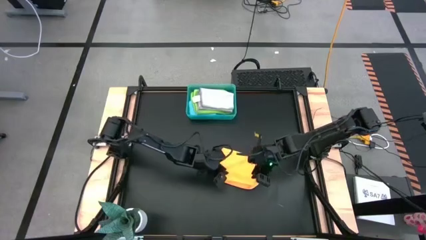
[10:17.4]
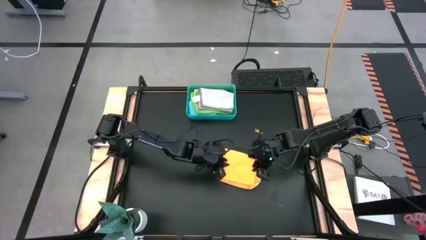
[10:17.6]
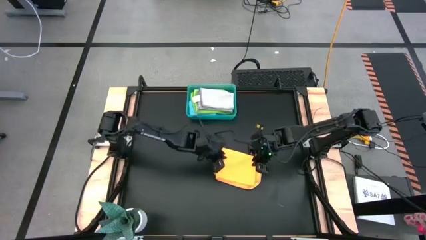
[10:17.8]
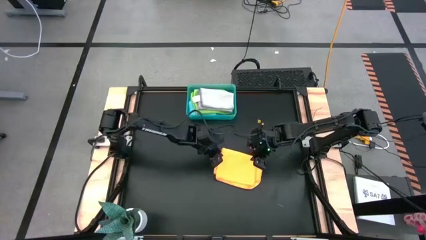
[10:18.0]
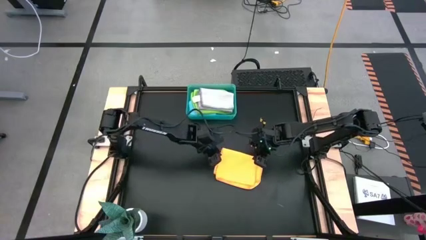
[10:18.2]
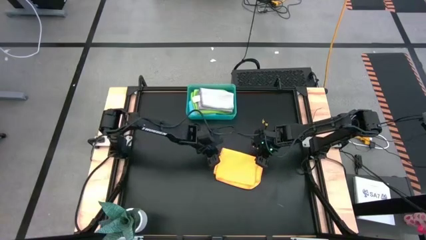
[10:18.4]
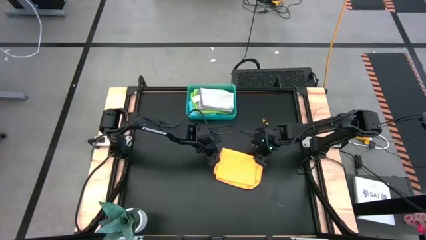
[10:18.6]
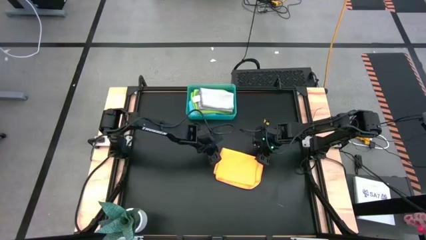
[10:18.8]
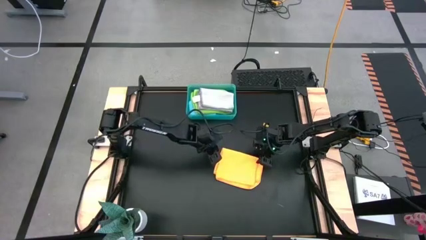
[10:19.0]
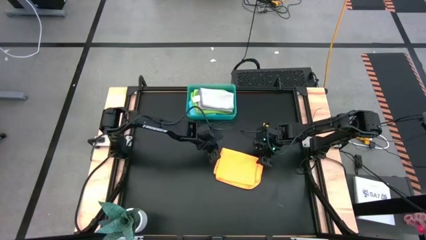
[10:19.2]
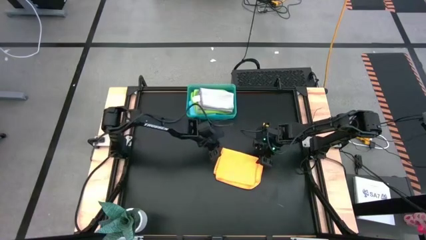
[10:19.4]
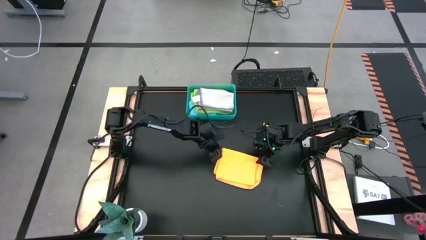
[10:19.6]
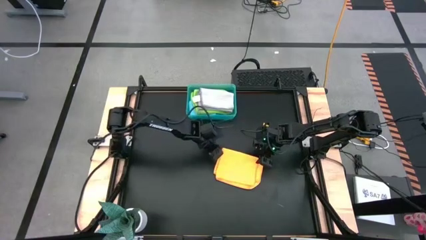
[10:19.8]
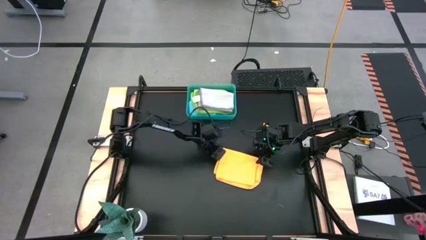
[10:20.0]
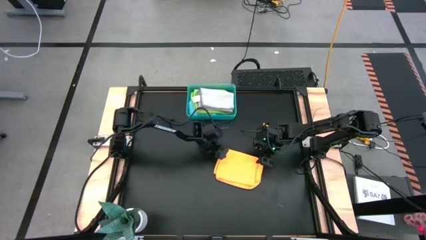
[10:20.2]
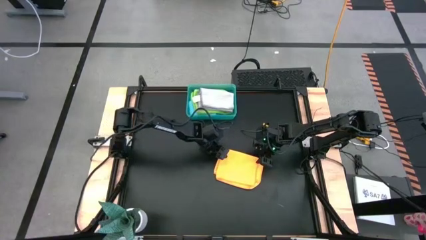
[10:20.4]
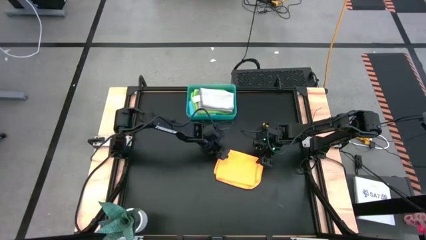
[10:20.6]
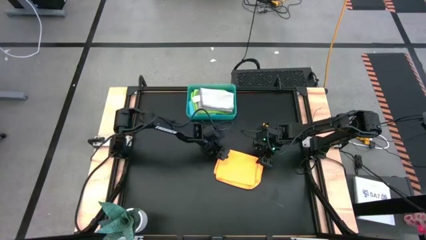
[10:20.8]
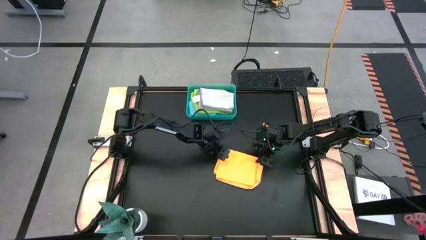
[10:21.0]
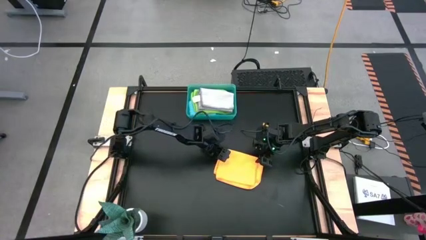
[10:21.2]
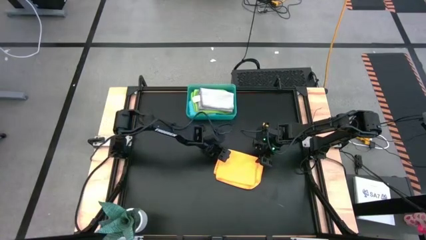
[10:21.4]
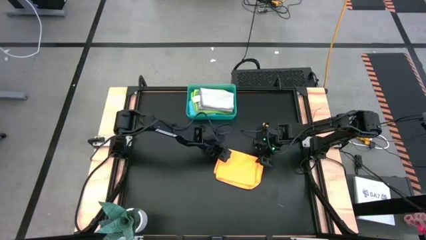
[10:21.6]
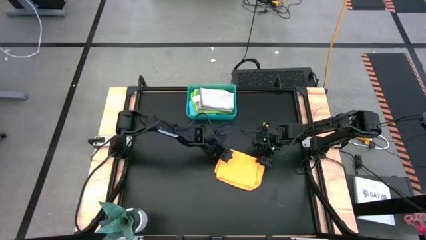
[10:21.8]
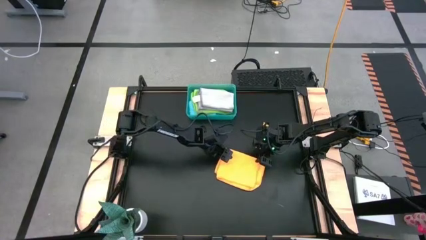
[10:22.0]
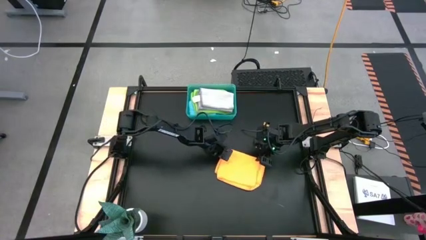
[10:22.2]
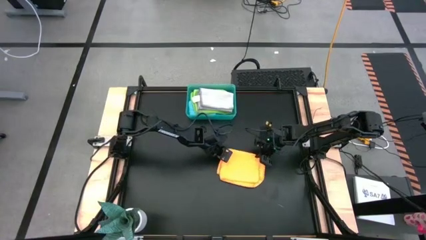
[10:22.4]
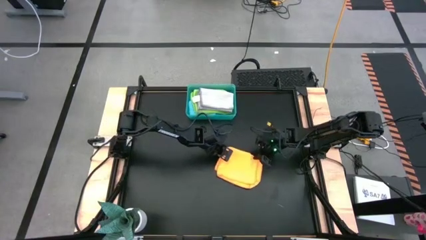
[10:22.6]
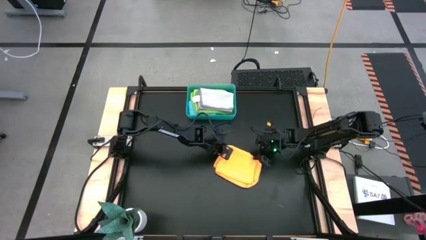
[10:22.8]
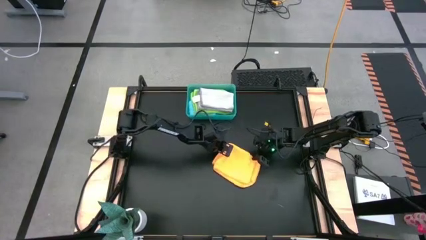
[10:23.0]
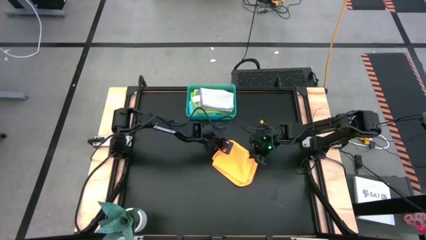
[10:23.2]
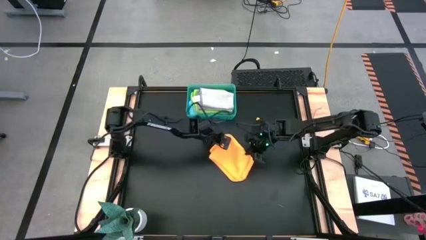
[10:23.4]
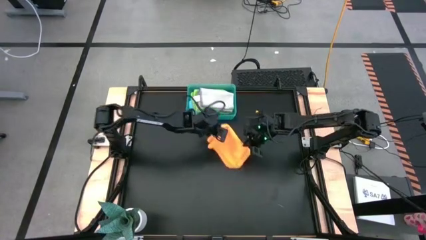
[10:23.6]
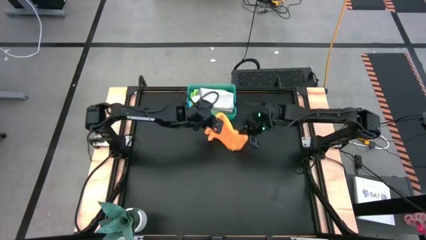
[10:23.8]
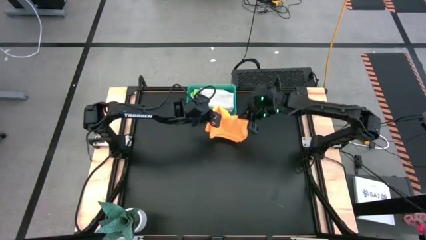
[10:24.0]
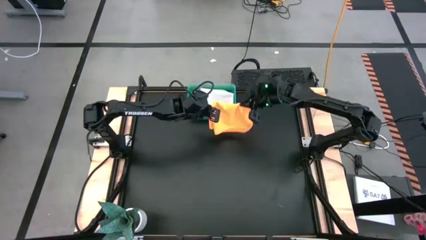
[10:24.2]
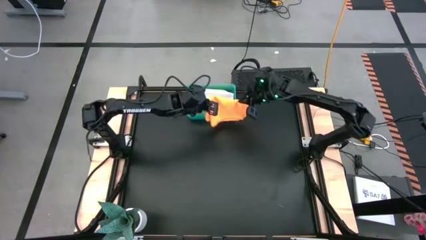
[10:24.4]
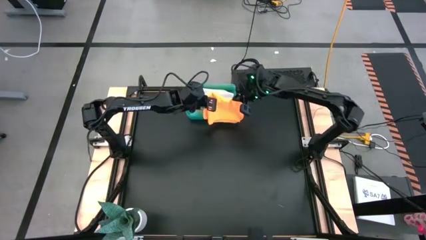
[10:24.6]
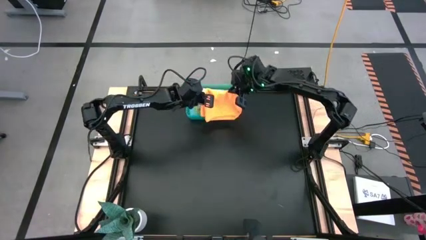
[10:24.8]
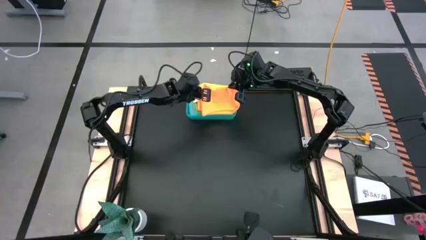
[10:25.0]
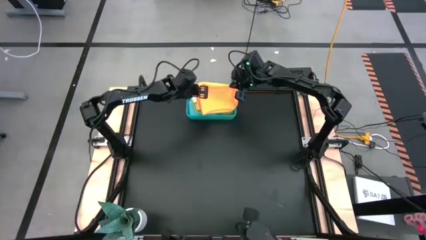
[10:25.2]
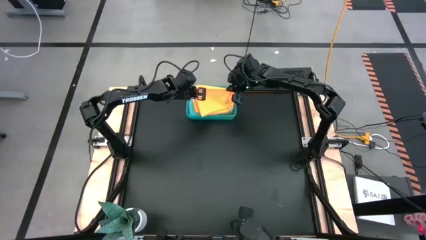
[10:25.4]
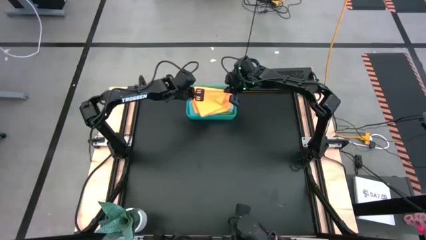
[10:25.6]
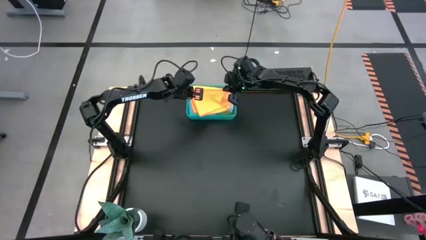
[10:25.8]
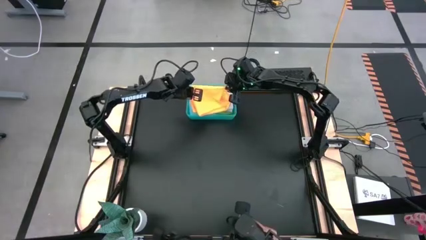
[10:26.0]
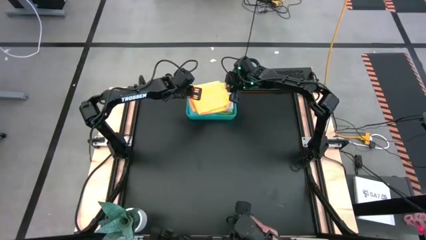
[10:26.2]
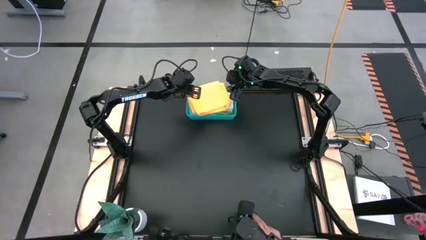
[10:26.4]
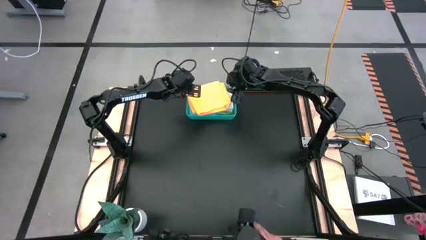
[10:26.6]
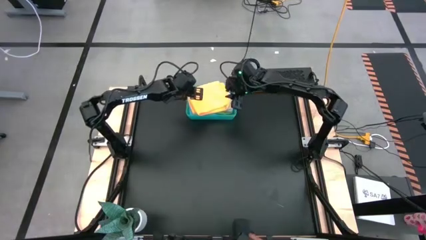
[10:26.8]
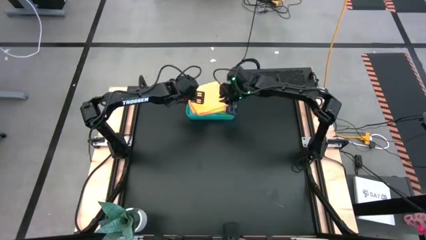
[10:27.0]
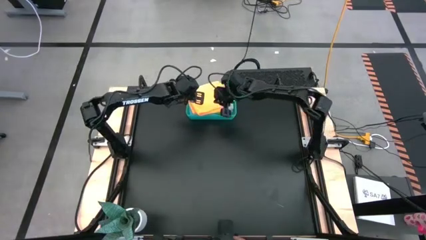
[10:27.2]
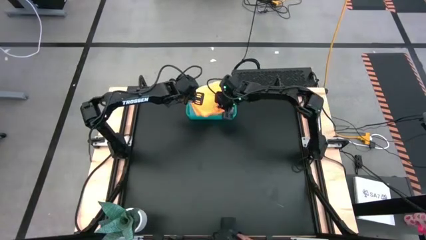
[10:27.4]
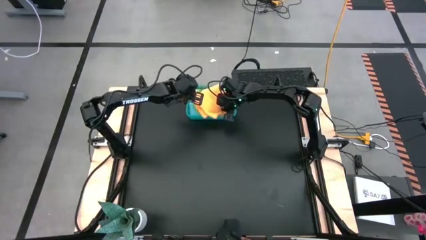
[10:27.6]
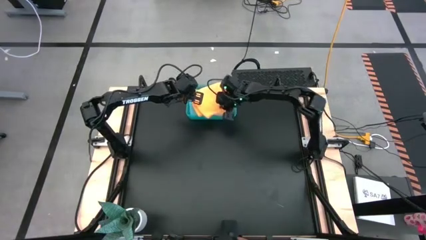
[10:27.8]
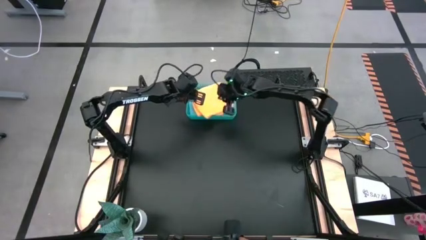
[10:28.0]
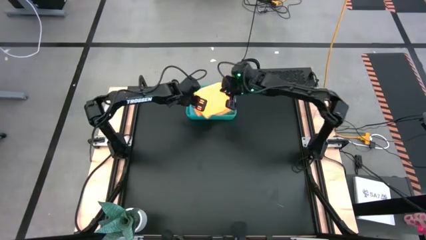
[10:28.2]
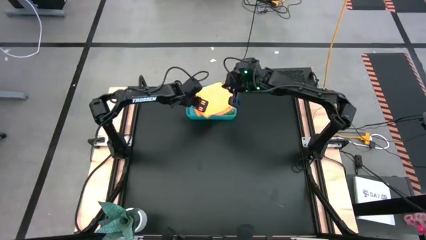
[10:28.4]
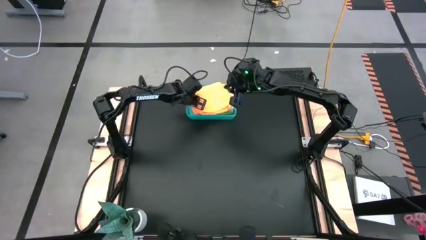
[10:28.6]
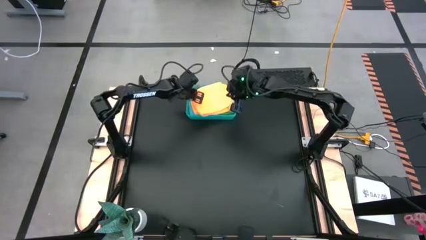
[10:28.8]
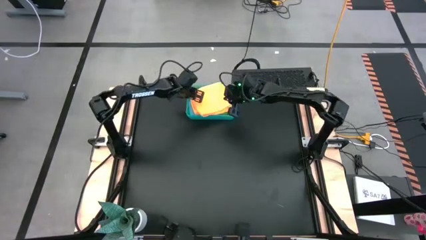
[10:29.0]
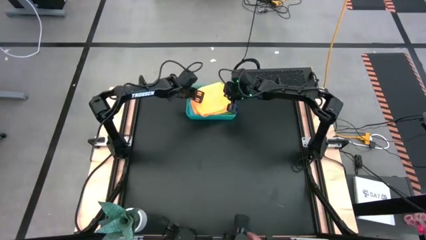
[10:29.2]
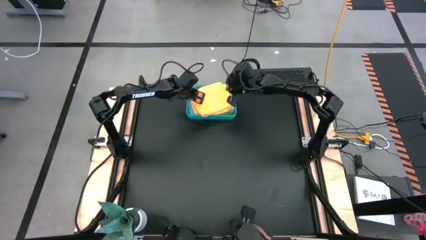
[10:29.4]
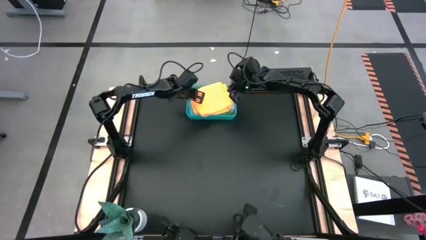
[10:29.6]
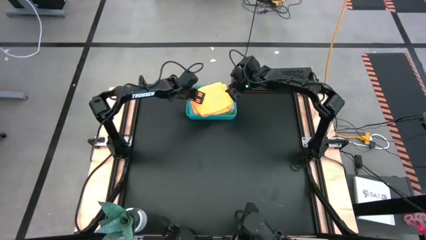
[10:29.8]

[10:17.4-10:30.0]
Task: Fold microfiber towels
Stack the folded orange microfiber towel on top of the gray towel into the bin

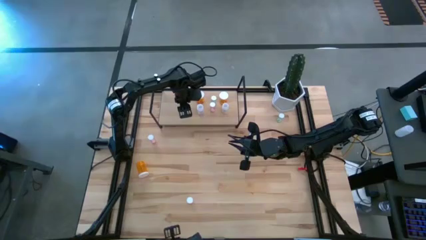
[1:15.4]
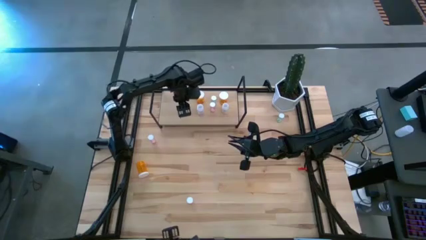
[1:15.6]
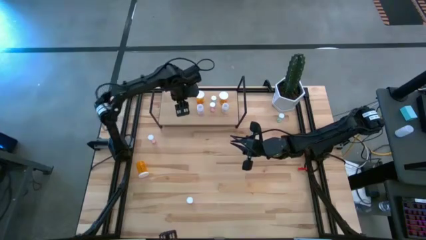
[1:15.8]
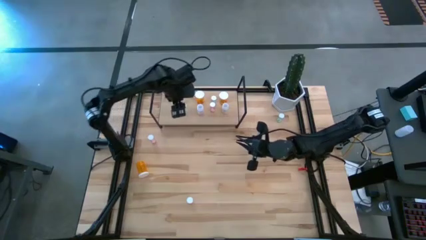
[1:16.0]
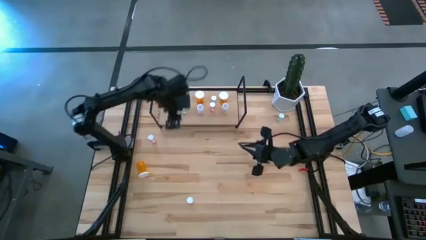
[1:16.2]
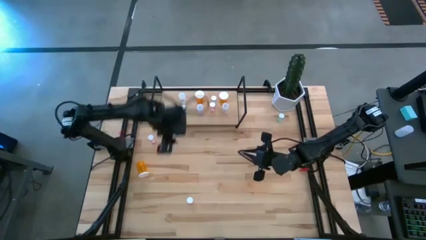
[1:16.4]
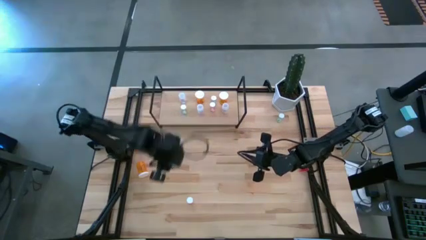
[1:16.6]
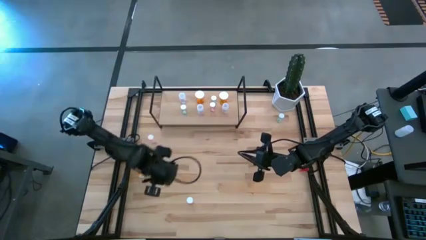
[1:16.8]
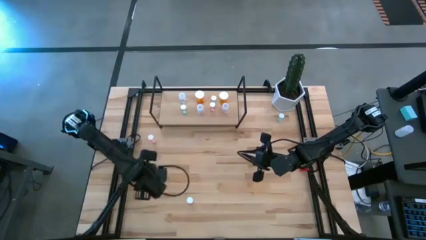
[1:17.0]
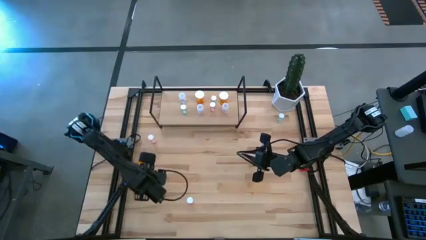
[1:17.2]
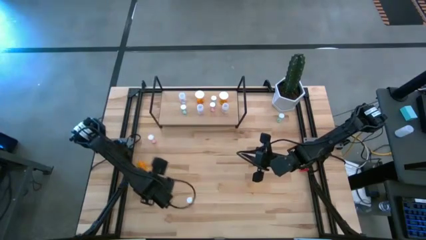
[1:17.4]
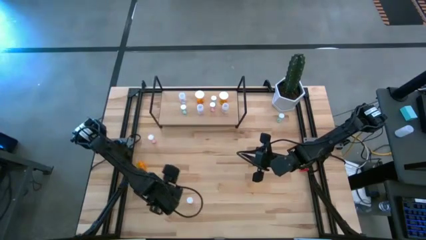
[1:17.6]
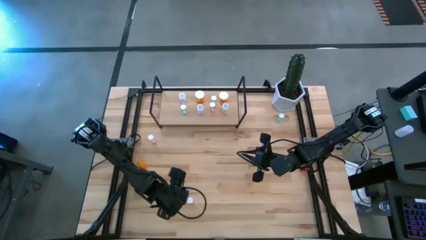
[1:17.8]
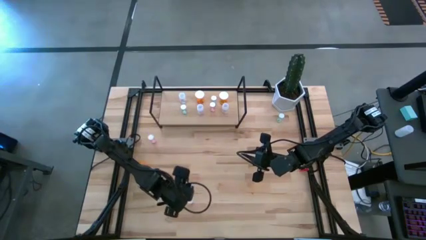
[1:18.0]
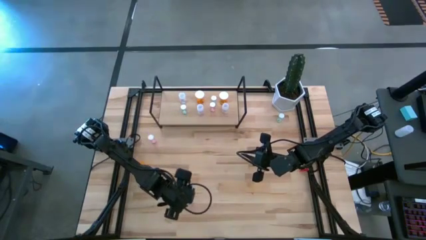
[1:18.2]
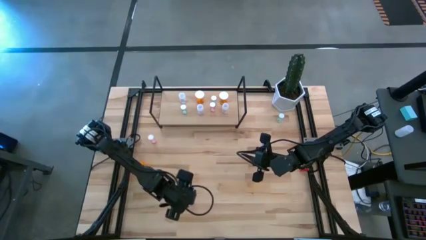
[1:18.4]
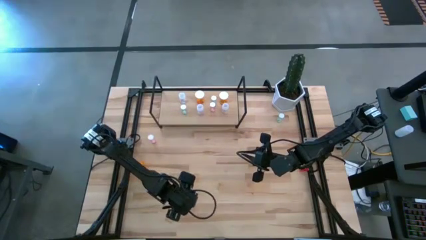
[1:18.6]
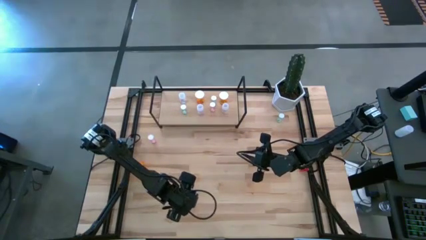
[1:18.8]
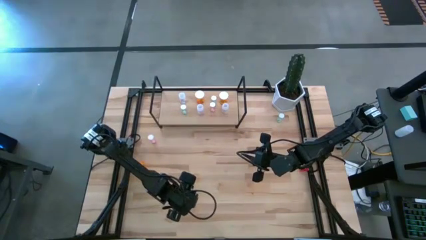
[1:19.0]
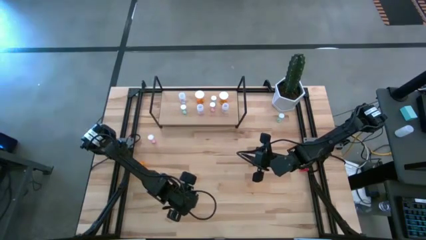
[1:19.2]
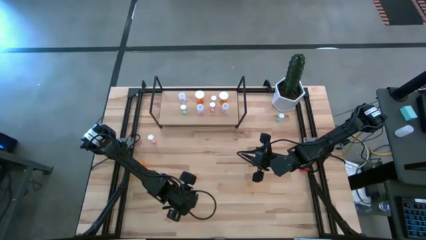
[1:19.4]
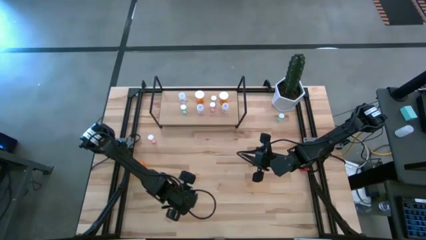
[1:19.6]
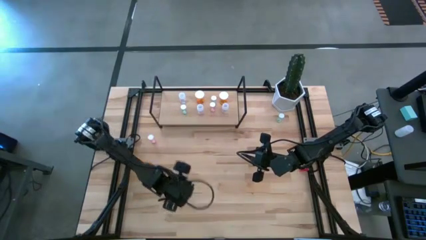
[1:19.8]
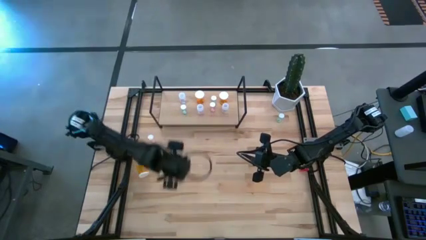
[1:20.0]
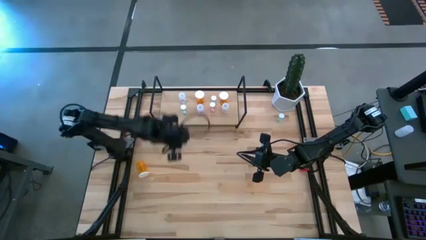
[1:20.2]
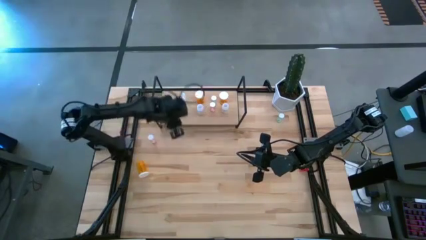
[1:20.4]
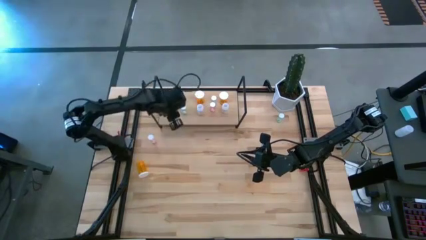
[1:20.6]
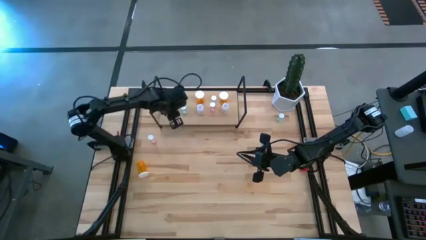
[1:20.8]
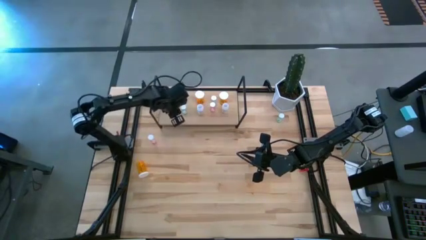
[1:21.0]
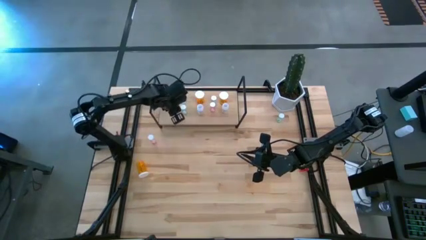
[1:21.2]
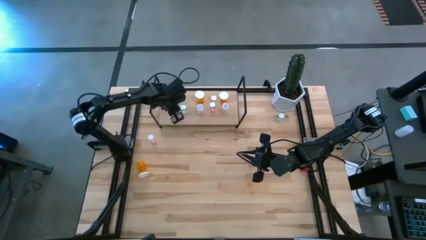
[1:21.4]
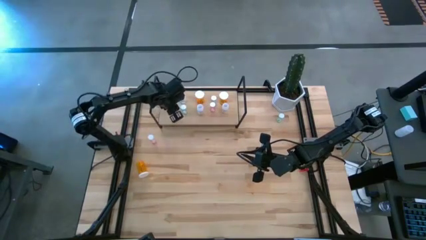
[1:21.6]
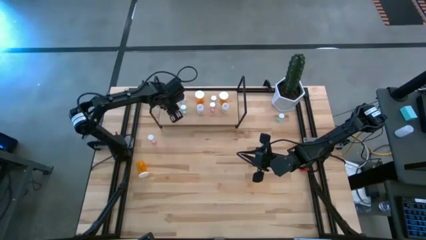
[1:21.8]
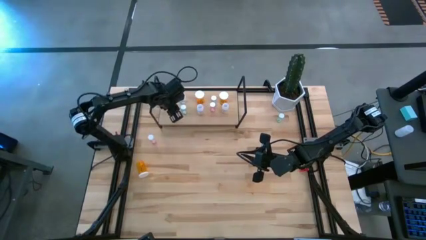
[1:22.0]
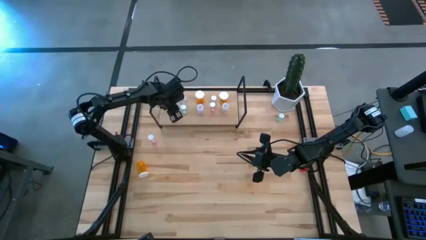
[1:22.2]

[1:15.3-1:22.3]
Task: Pick and place medicine bottles onto shelf by color
Put the bottom pink pill bottle on the shelf
